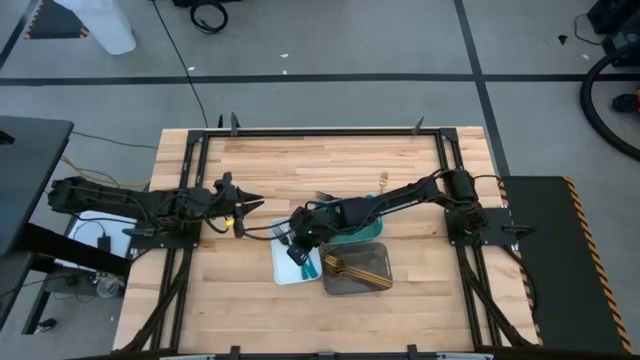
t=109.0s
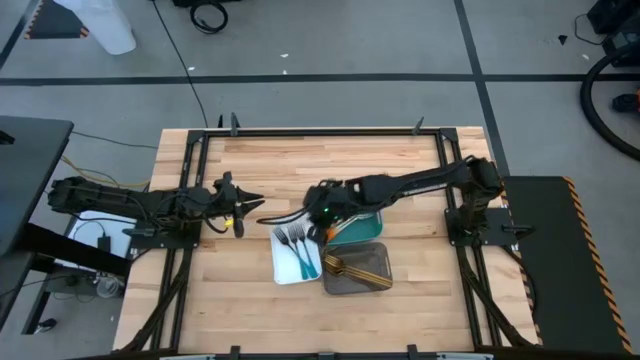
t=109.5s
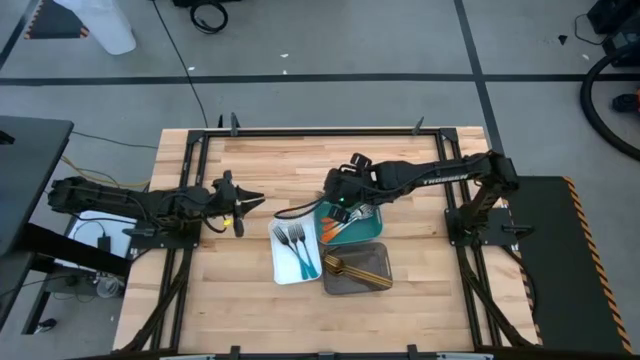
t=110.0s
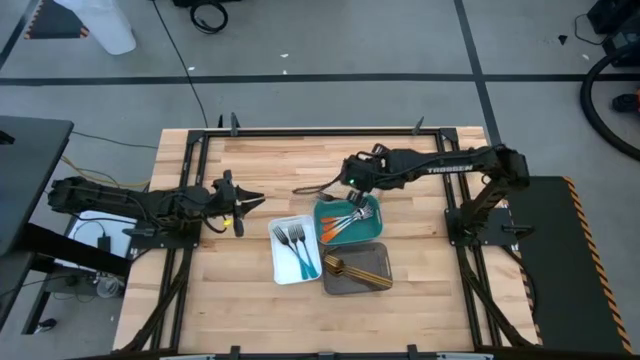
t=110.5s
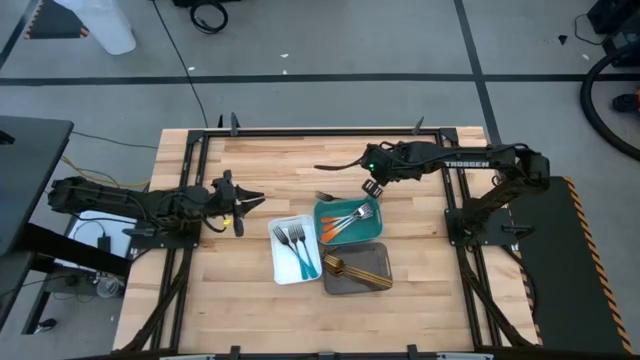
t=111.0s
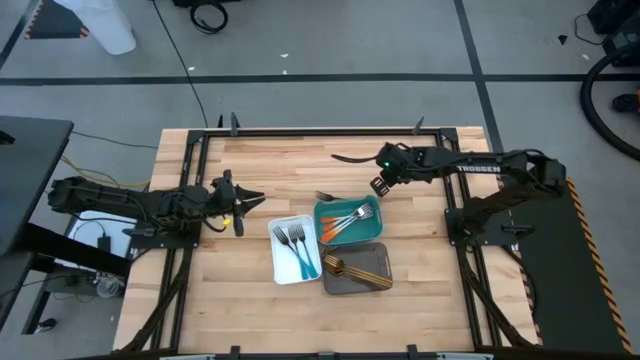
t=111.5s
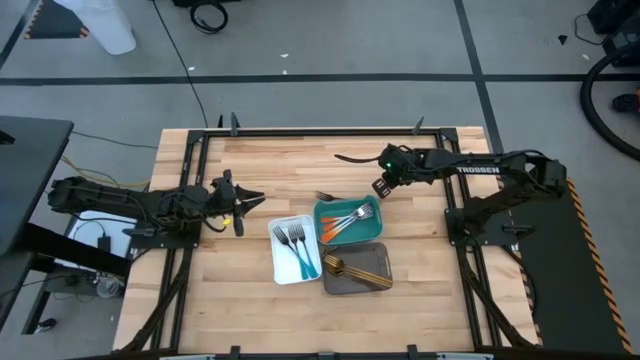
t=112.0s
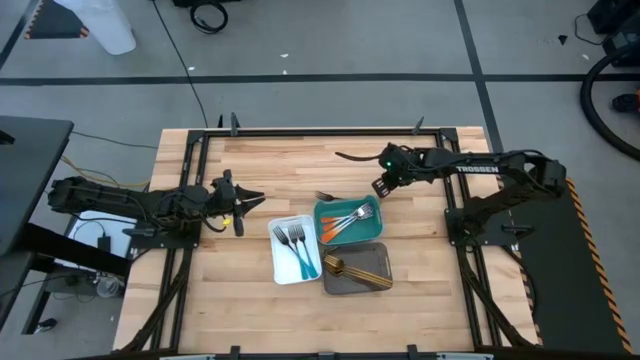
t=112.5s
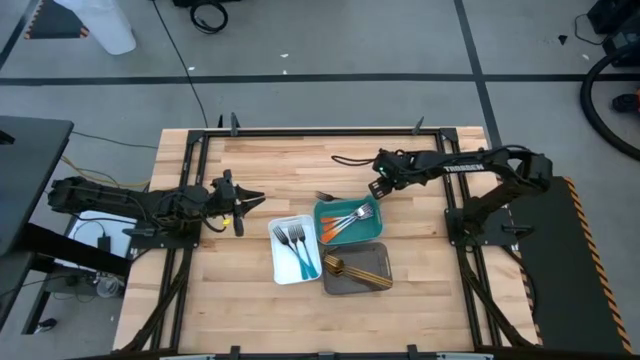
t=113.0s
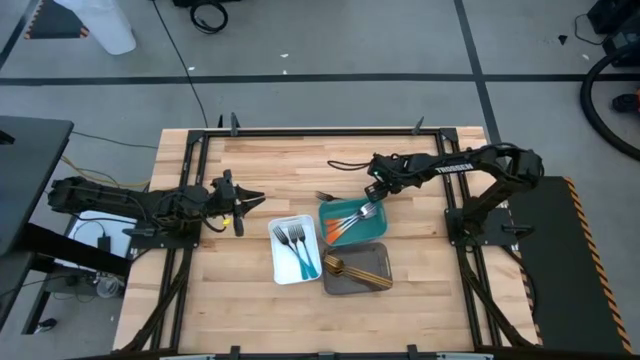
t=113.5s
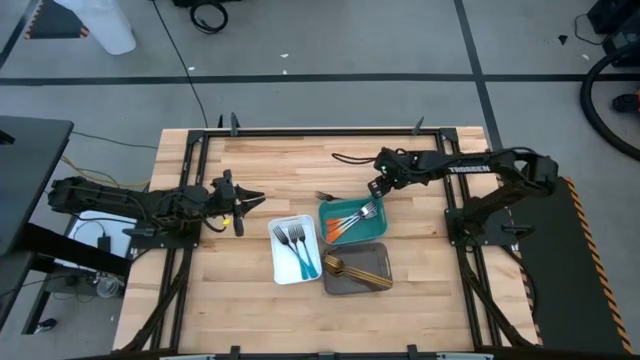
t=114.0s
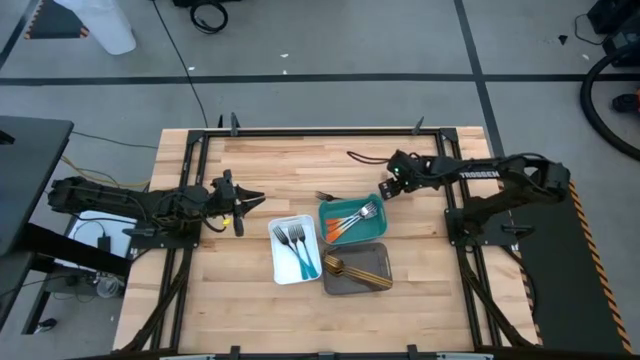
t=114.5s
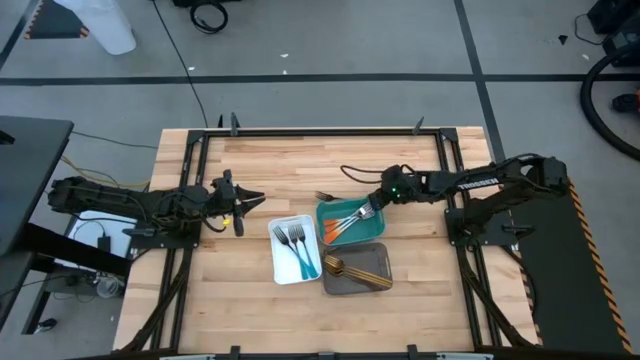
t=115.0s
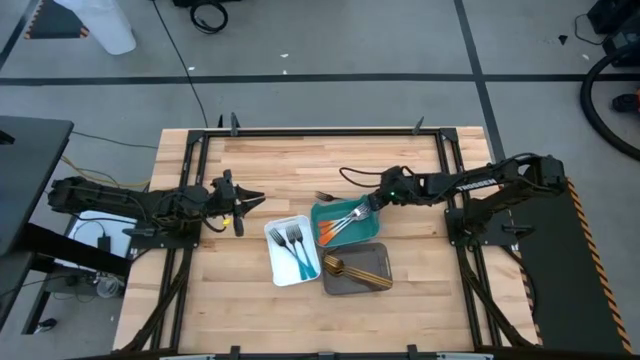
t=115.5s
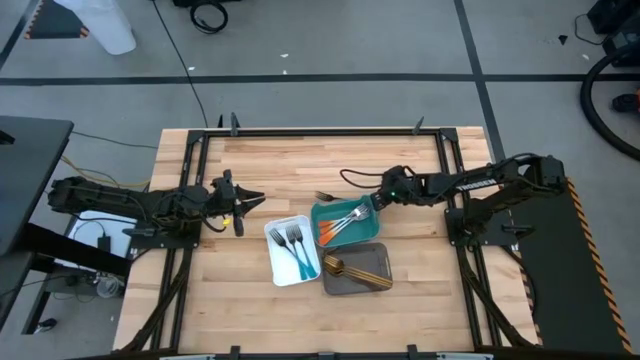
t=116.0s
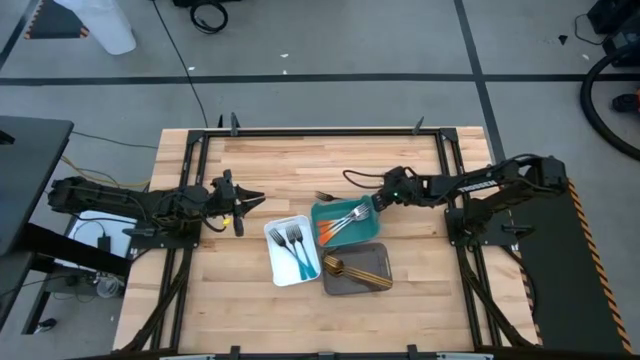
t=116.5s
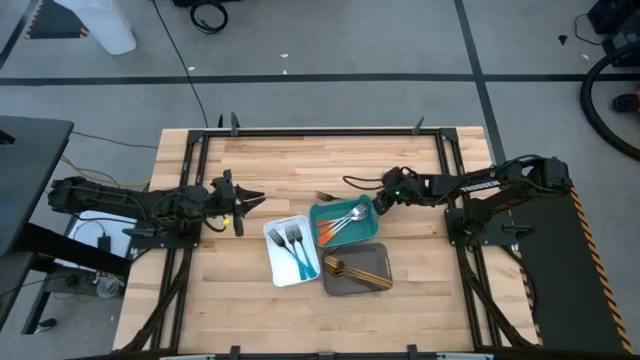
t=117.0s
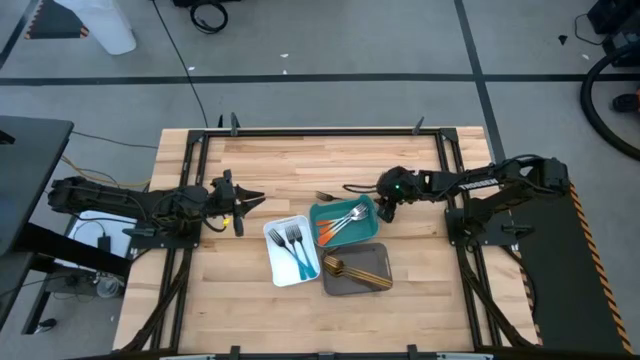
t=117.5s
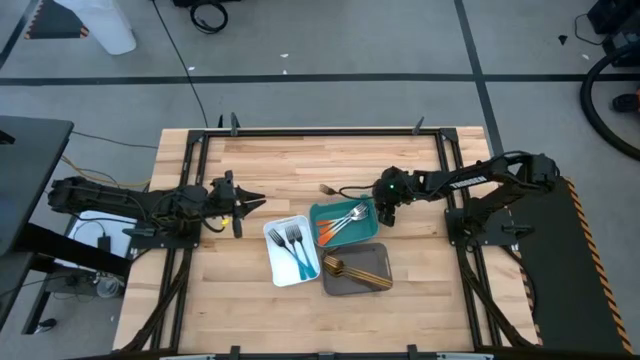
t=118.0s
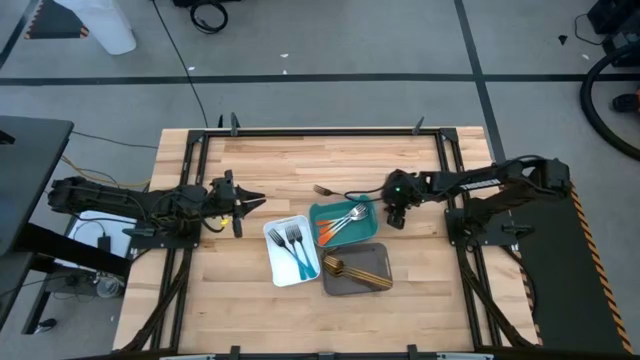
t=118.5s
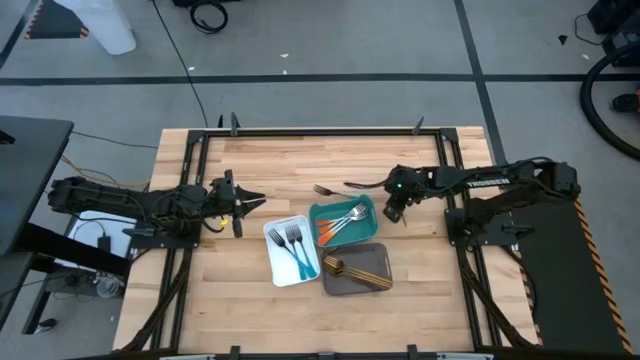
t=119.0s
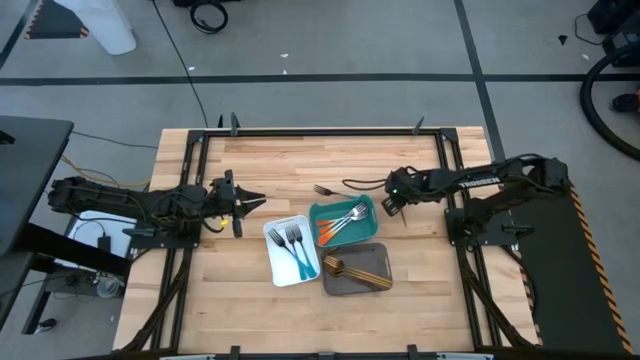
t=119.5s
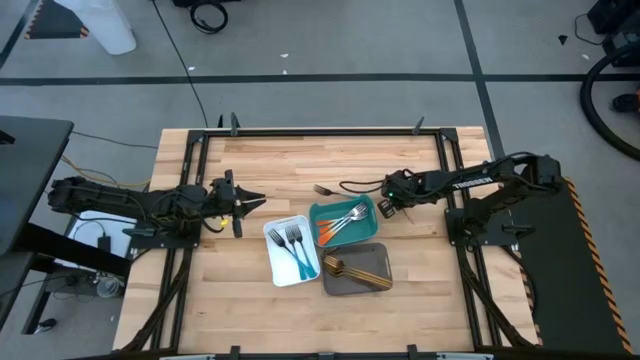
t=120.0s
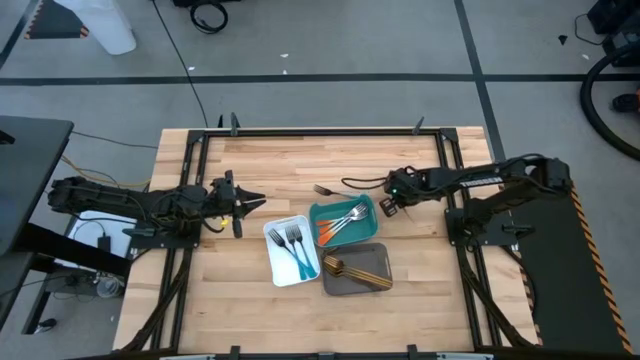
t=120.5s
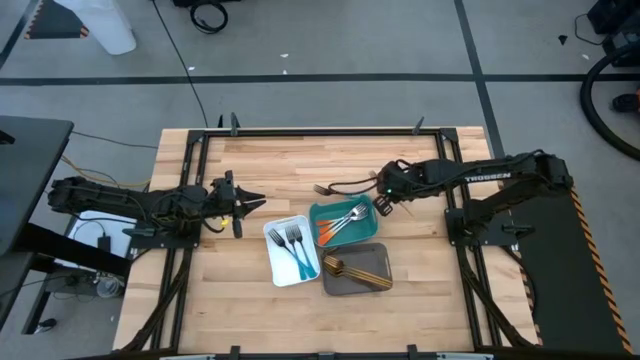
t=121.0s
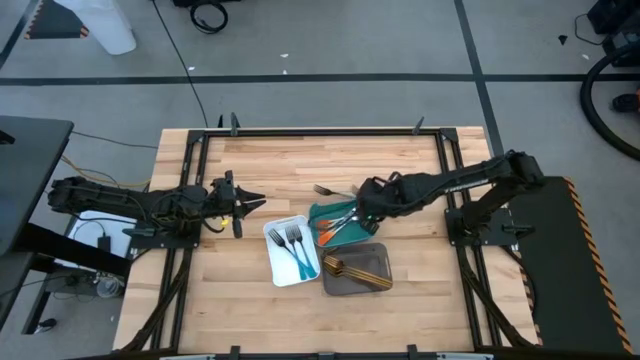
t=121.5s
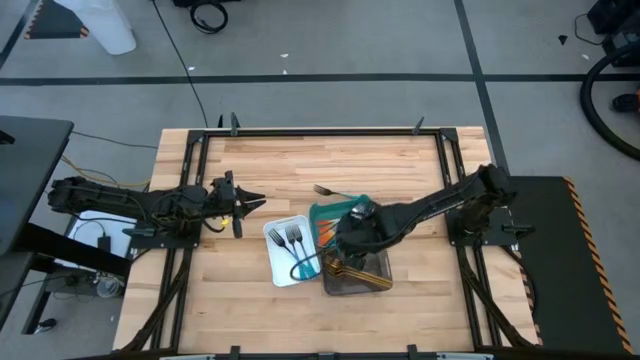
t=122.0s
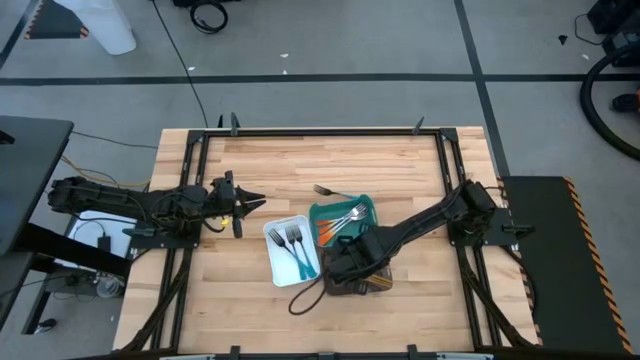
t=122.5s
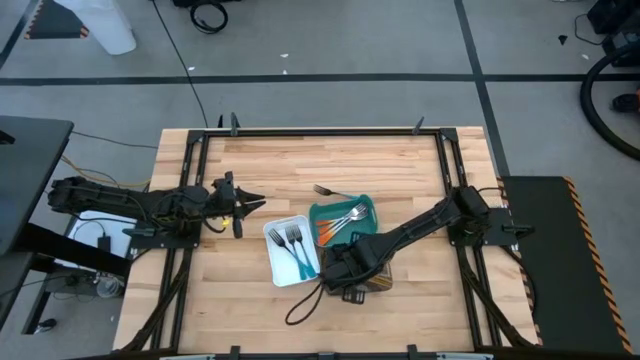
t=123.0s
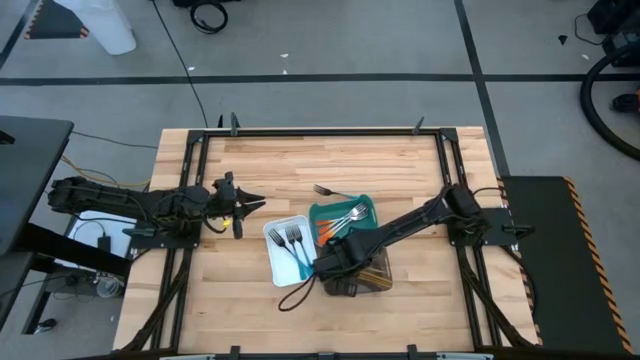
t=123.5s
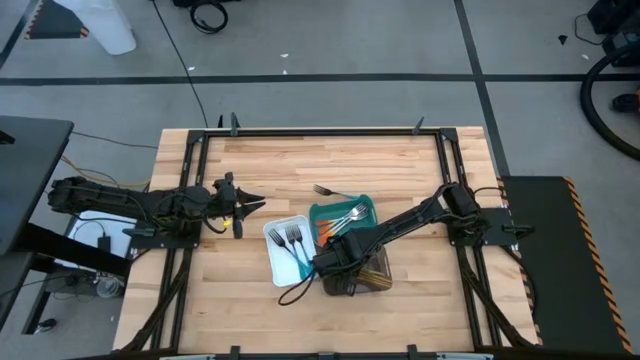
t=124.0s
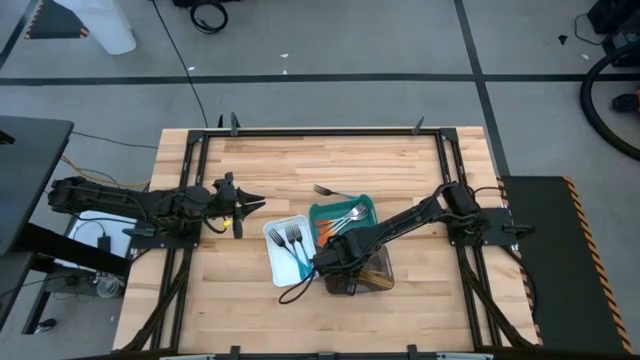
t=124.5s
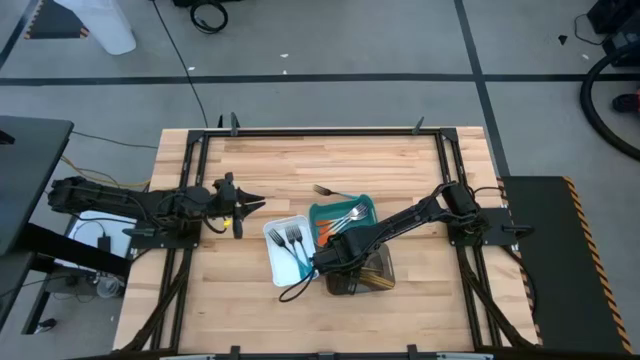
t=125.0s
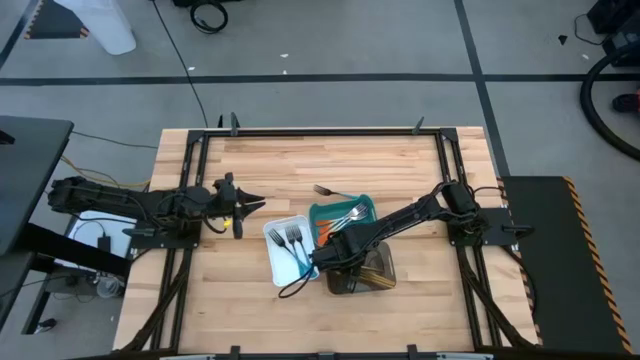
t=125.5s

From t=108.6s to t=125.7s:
Task: Sort silverware by color (type)
Put the gold fork into the black bin

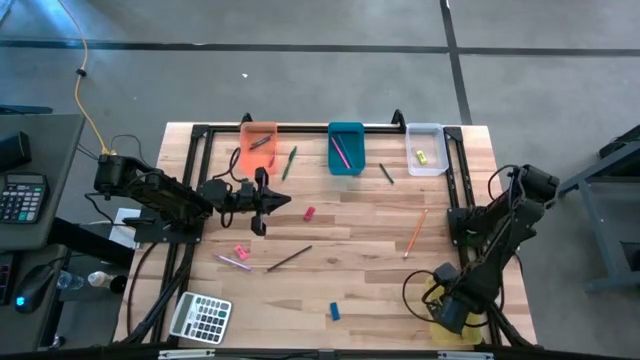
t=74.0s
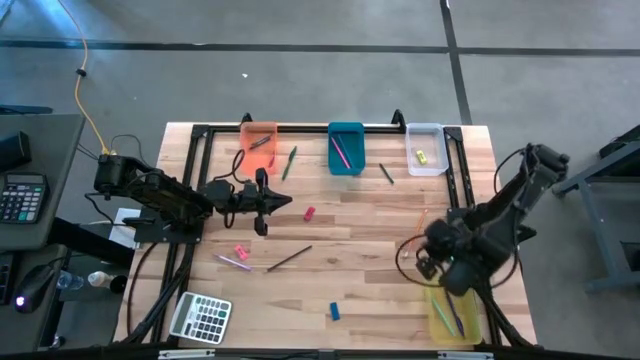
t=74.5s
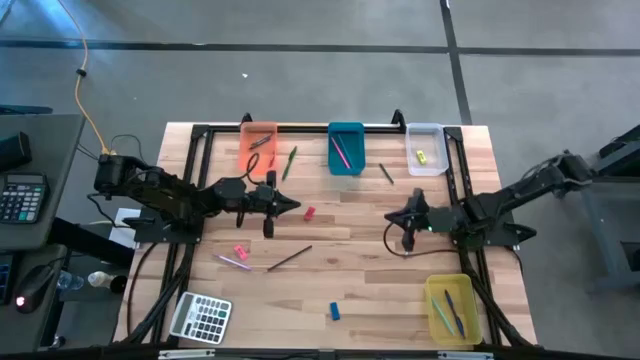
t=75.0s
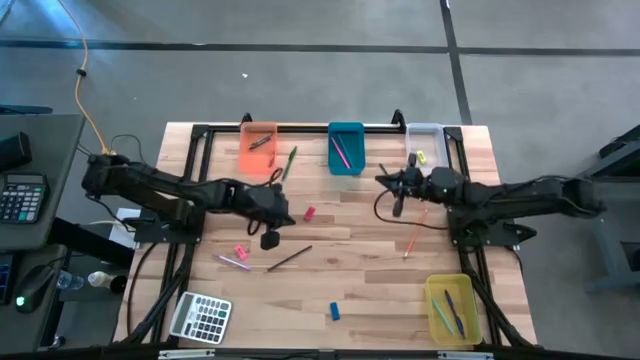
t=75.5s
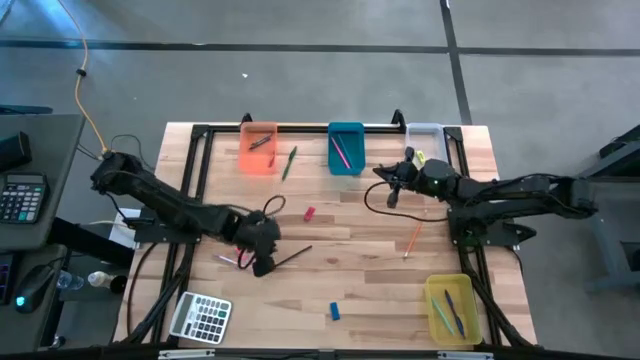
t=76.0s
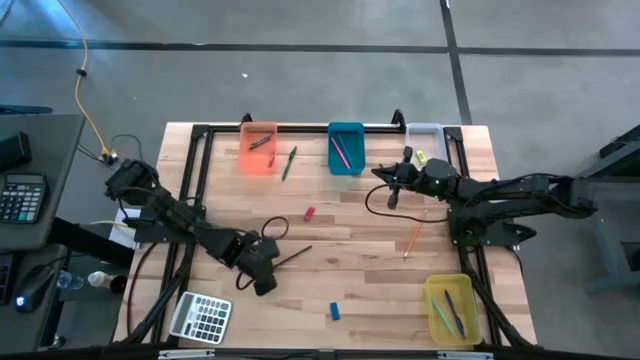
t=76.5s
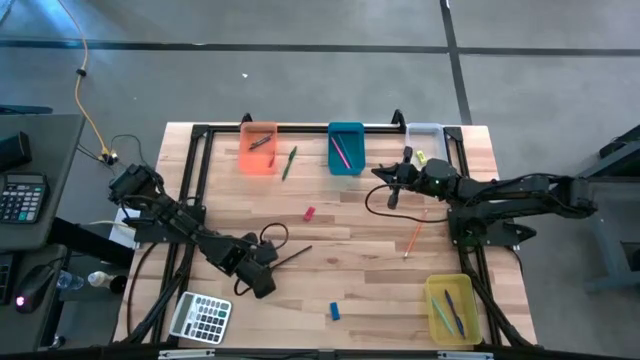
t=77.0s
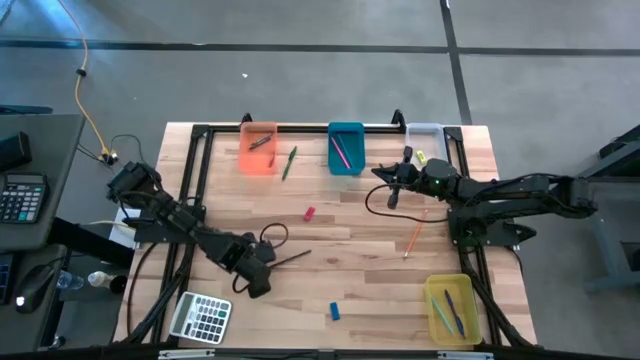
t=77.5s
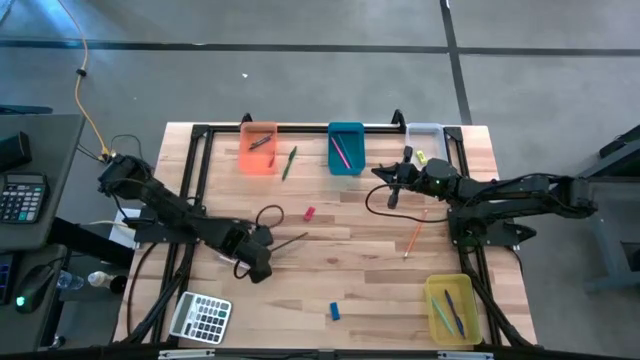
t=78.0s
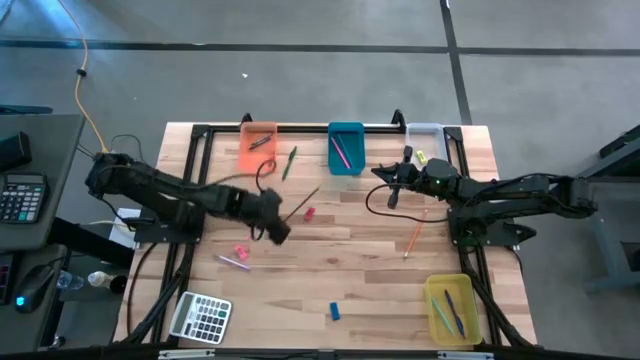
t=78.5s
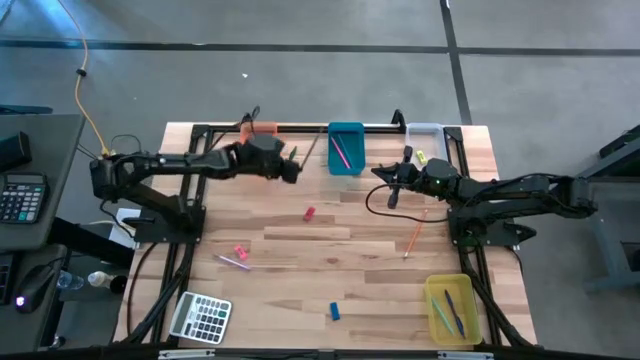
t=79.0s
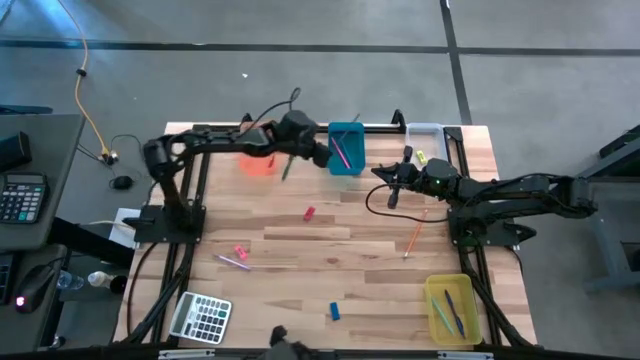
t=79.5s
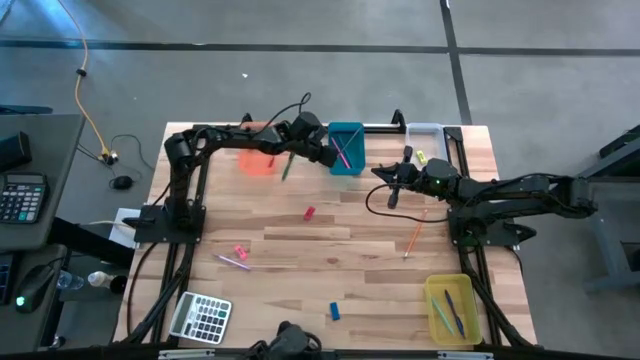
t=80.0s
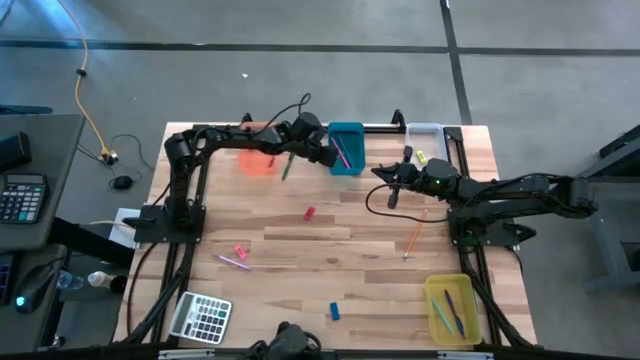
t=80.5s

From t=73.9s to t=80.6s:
Task: Sort crayons/erasers/pens/pencils in bins
Put the dark blue pencil into the blue bin
